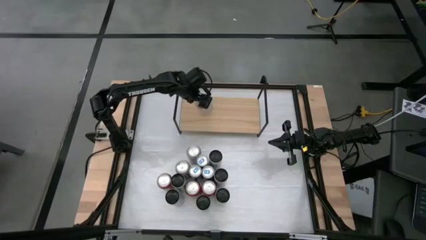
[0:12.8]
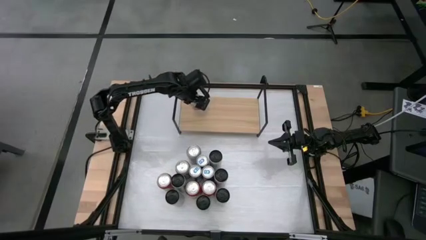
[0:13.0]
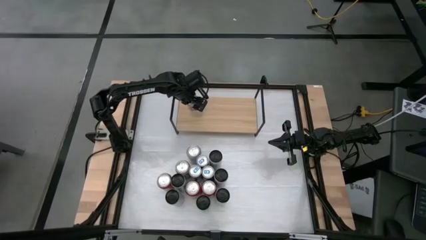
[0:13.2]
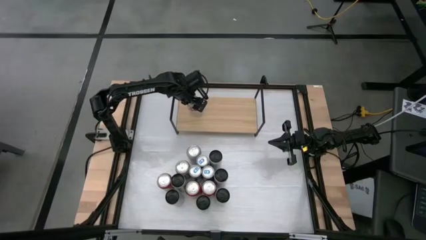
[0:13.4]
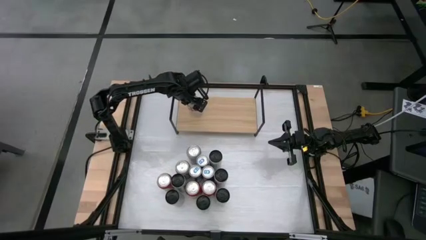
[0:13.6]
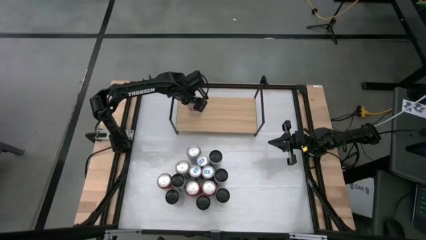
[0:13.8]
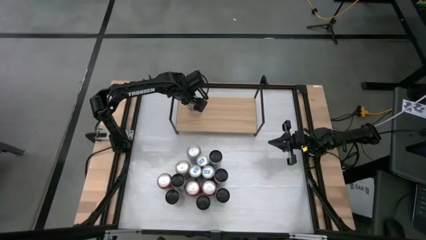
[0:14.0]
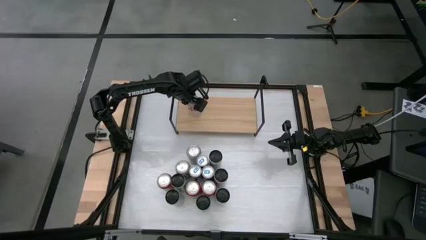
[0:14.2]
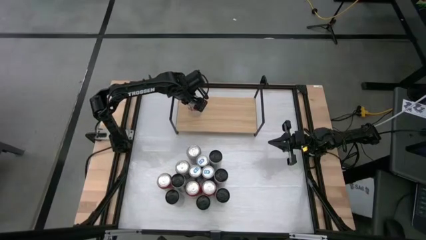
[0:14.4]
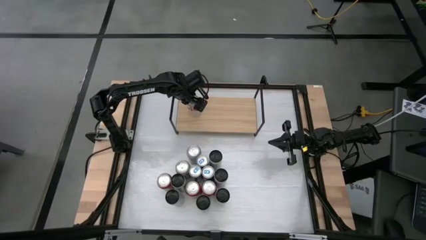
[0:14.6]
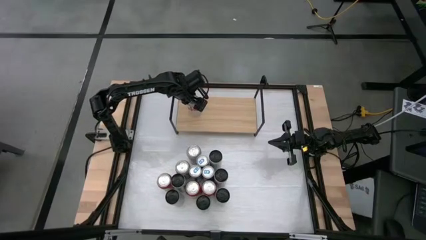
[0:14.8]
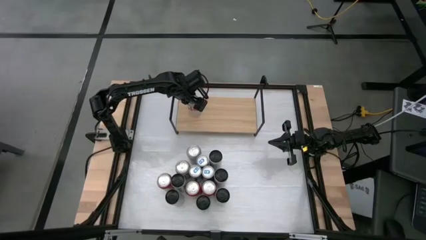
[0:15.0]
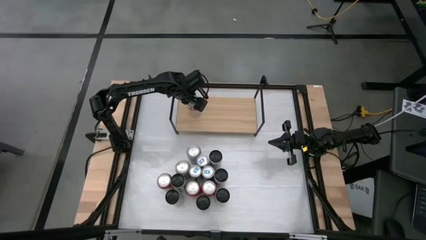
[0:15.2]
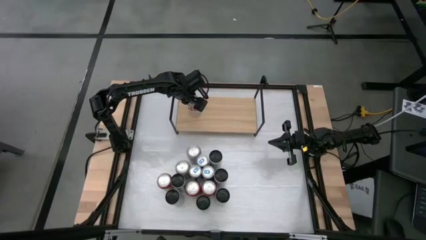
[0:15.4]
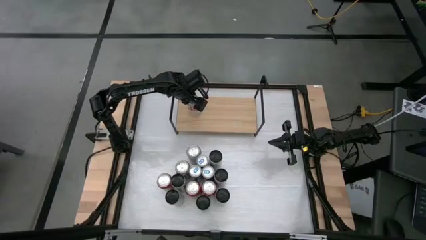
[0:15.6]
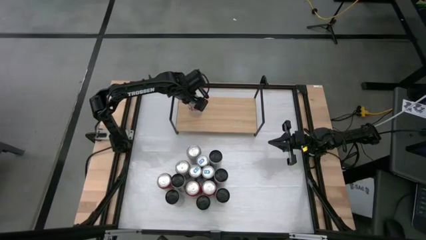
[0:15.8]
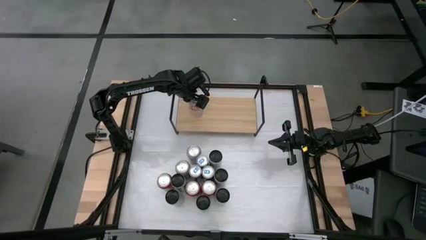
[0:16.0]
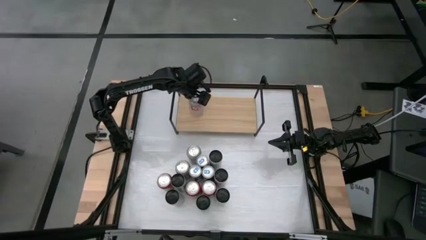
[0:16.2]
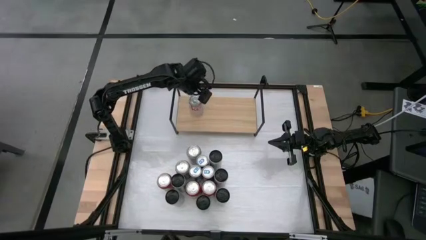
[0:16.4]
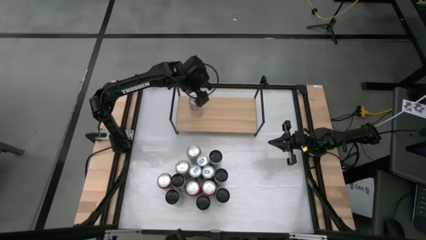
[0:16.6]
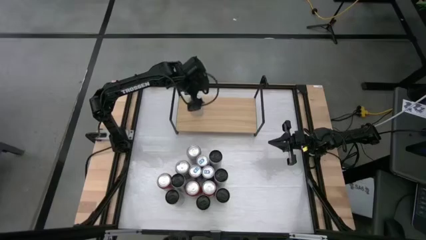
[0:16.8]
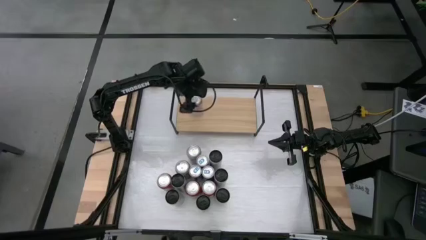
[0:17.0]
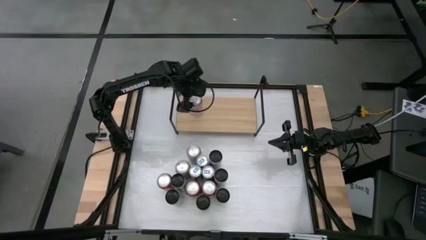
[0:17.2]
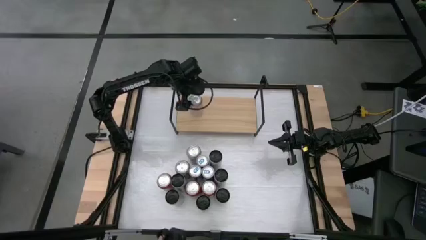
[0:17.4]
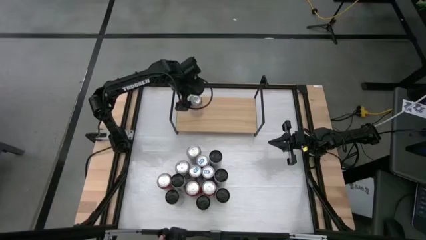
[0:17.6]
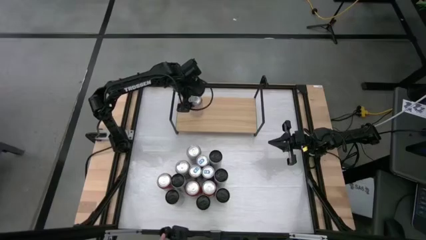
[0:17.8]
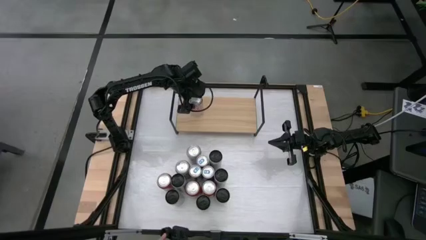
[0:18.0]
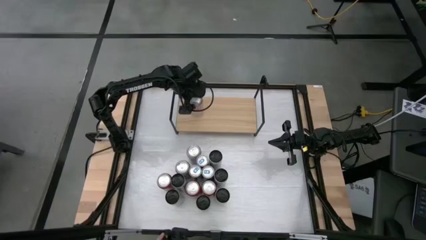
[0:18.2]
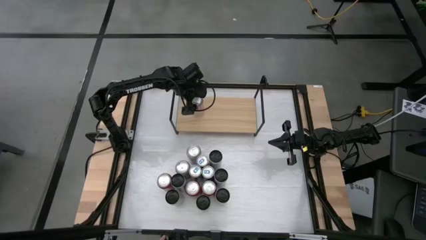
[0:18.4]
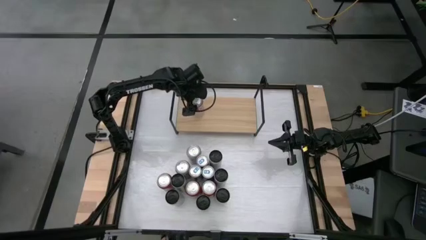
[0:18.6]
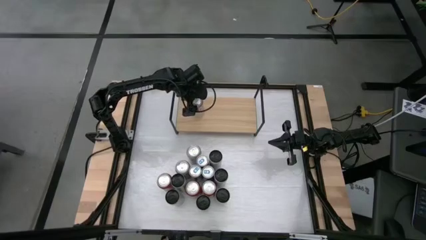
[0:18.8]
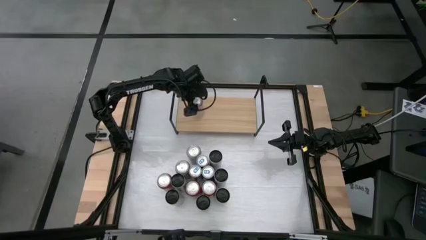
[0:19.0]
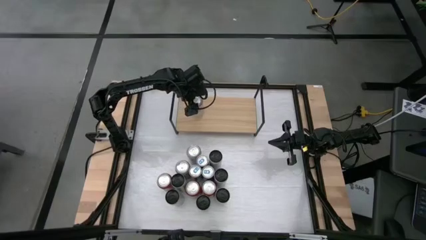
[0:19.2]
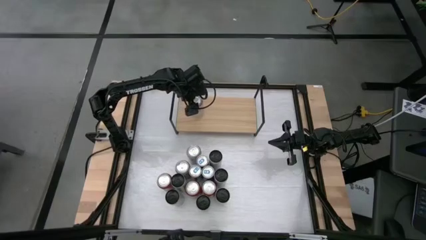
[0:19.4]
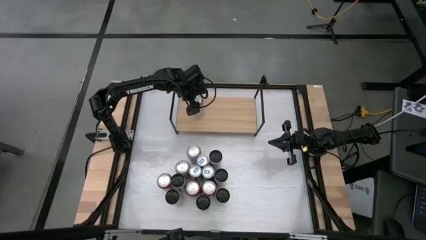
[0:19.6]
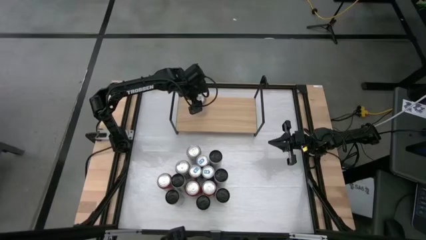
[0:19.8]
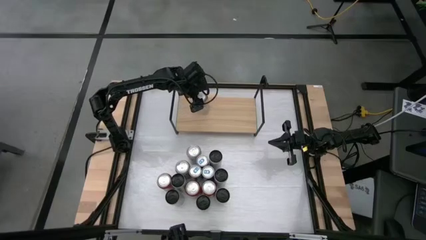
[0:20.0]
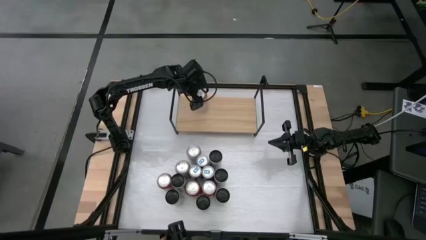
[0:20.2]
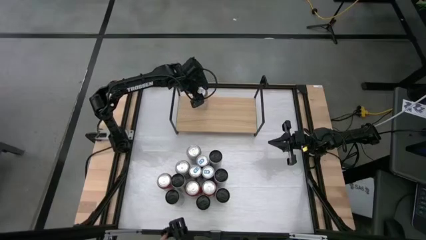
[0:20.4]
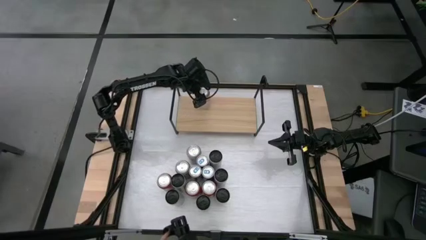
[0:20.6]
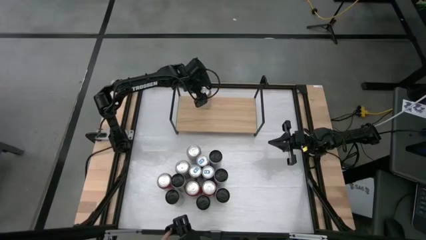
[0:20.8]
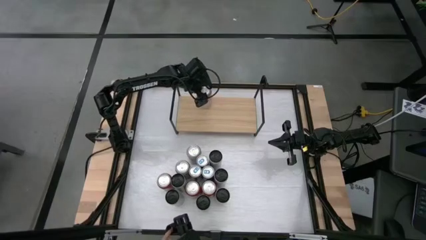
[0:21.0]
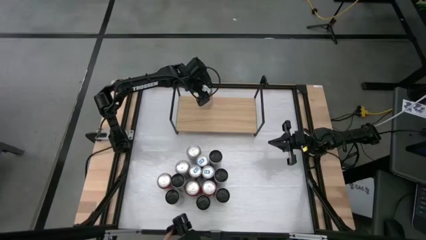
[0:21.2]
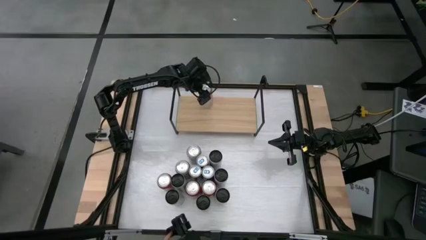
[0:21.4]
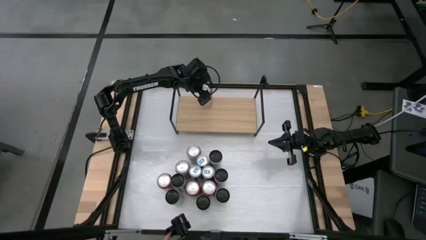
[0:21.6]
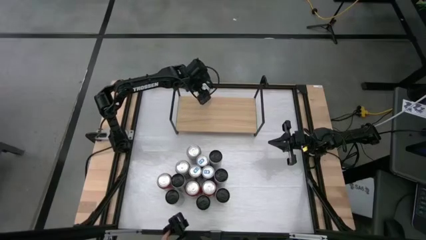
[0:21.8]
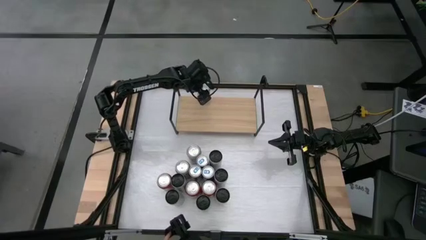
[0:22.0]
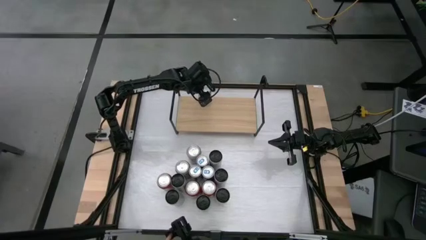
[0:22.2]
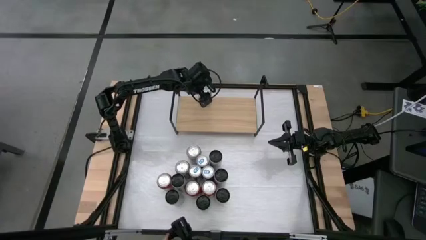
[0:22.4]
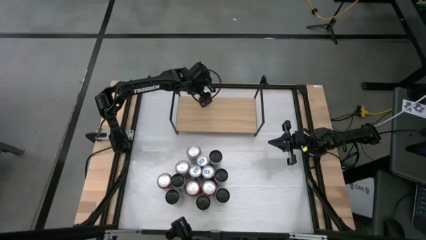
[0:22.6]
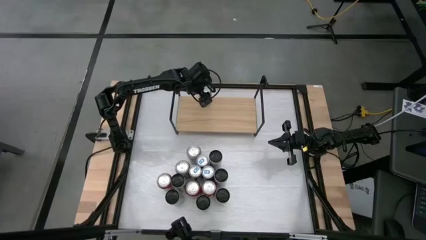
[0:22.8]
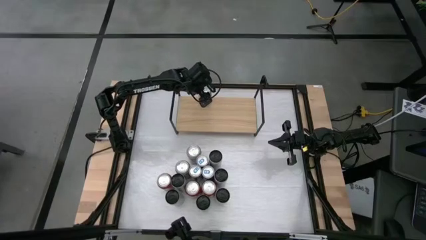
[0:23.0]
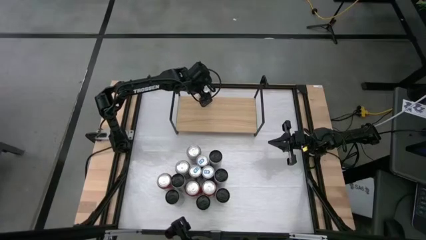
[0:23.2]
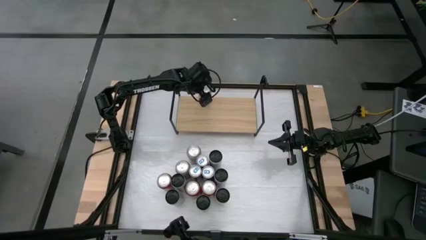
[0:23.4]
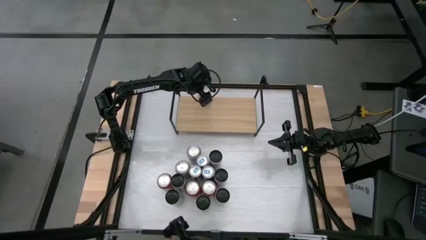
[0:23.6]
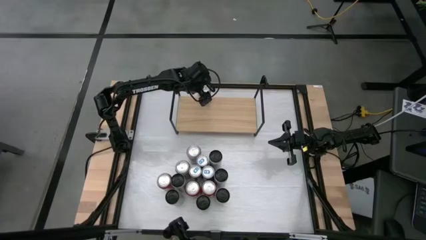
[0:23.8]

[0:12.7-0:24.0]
Task: Place canned beverage on shelf
Put the red silver soda can onto the shelf

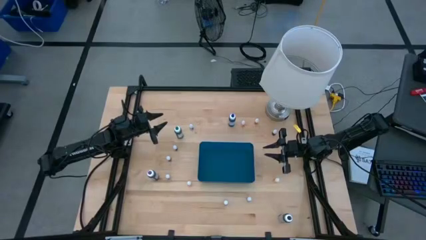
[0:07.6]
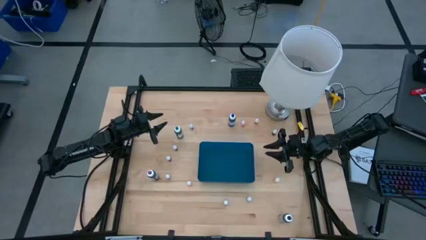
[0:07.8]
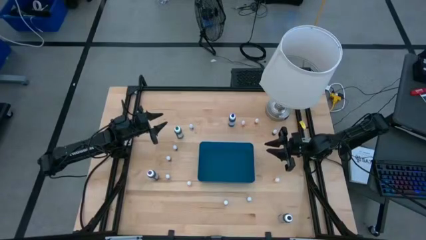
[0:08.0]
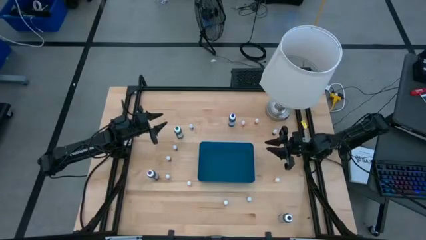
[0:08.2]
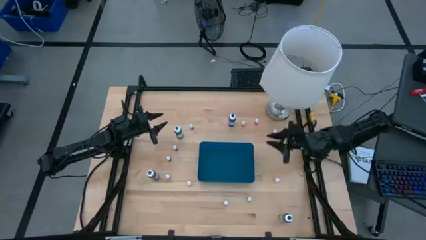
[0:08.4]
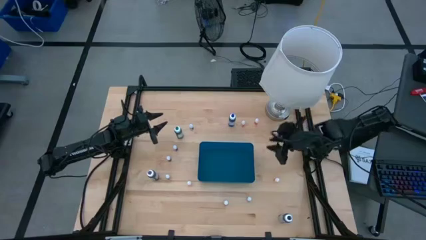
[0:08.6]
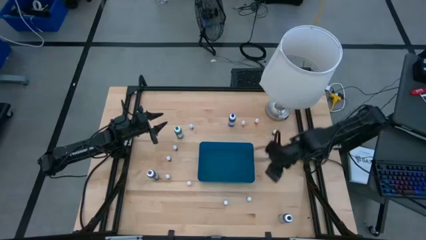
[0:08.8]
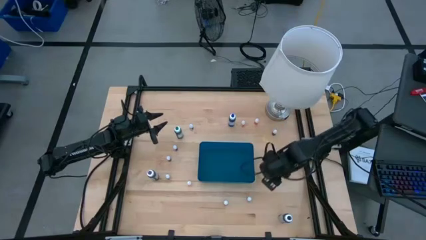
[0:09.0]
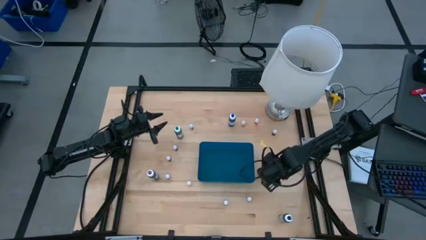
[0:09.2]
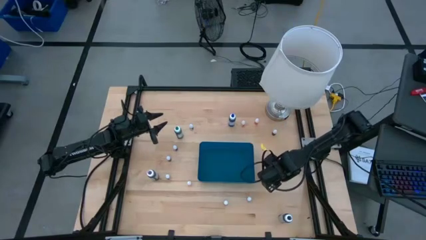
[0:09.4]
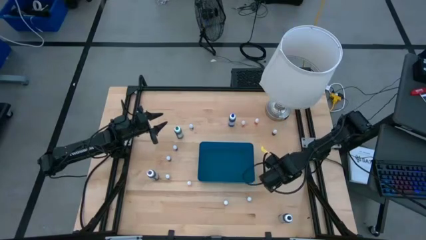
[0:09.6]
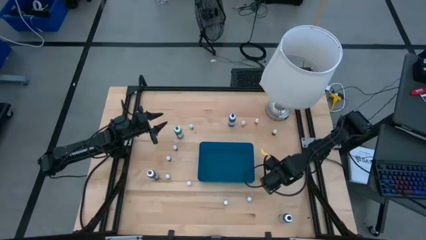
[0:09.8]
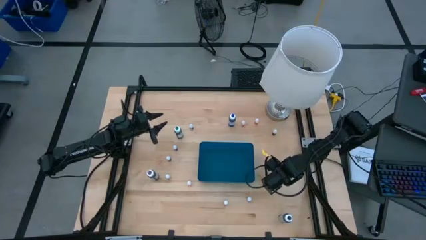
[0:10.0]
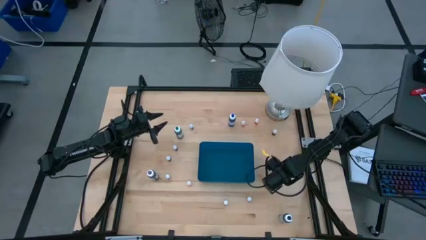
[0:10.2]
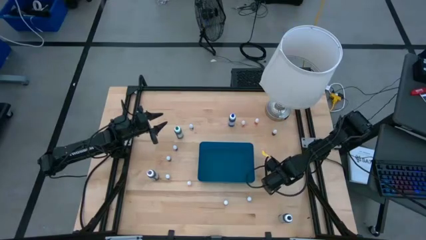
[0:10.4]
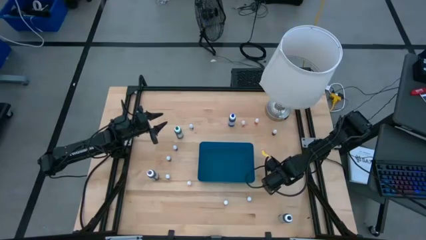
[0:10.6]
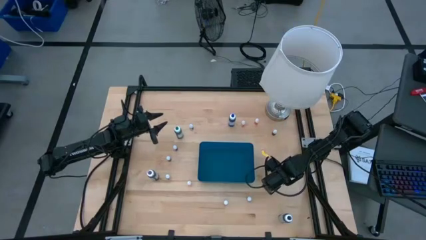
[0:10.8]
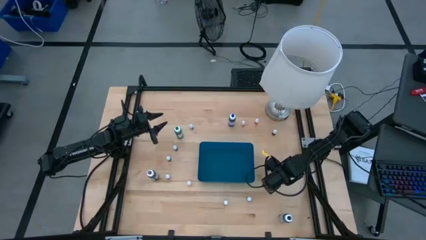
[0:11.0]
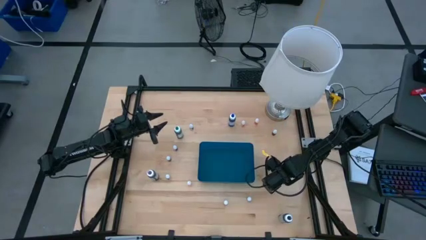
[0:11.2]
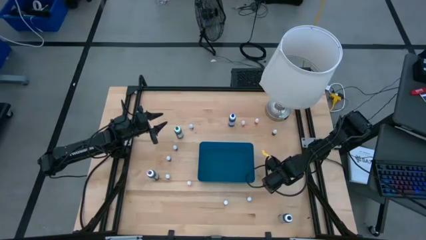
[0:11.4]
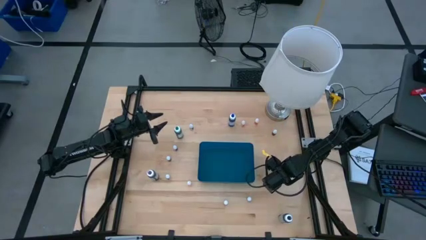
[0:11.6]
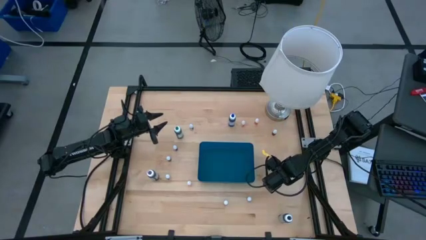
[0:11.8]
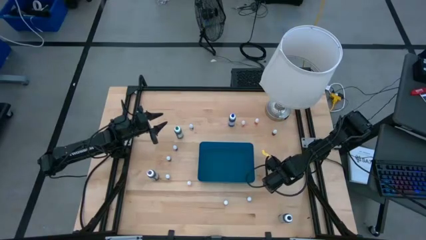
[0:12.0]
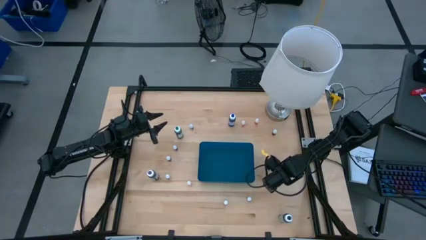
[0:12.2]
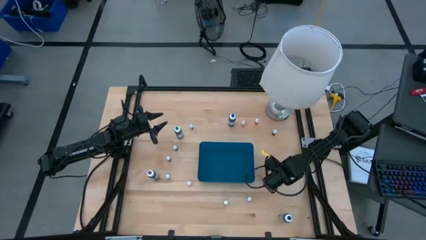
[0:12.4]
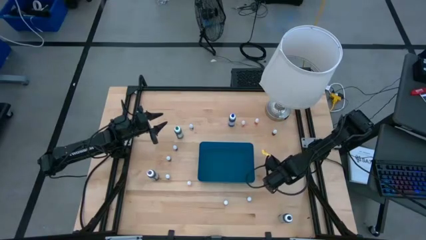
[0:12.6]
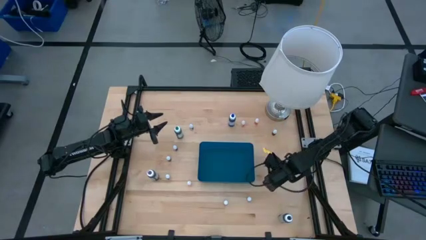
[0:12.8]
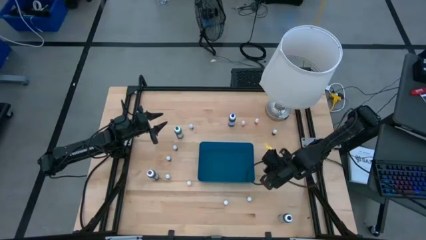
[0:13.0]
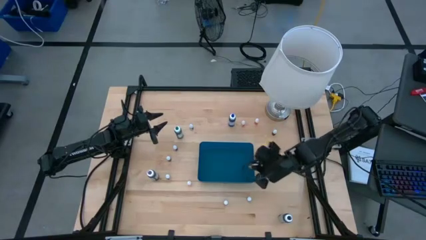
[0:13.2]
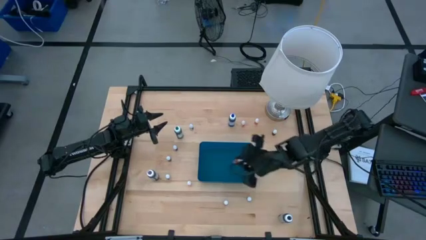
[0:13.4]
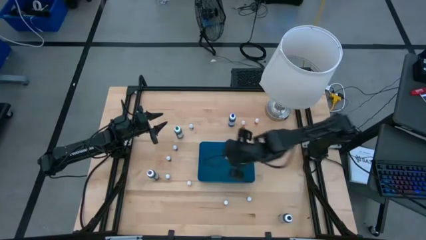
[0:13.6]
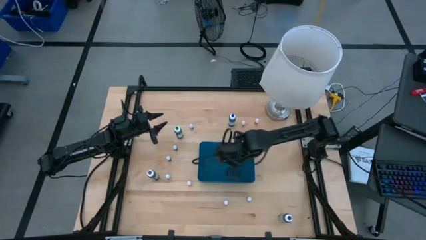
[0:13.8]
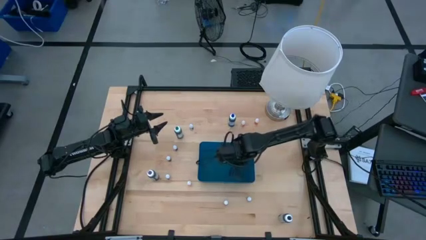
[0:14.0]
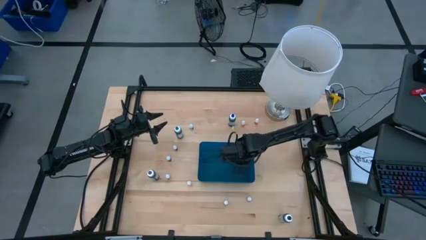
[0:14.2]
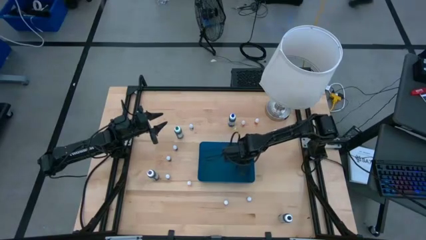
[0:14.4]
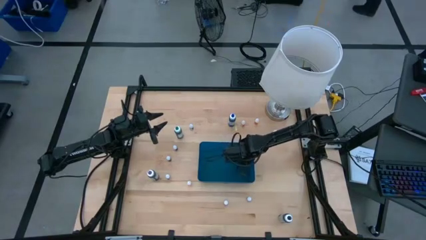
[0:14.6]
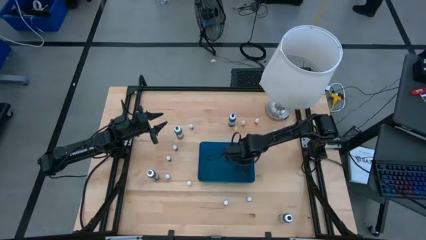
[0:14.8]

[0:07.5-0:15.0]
Task: Pick & Place food coloring
Put the small orange food coloring bottle into the blue bin
